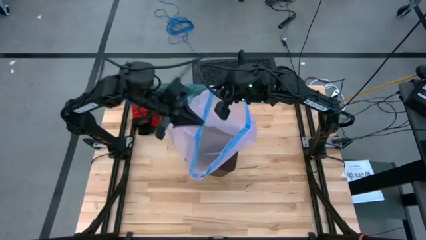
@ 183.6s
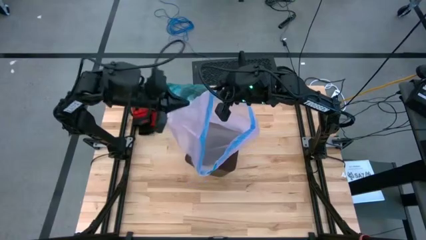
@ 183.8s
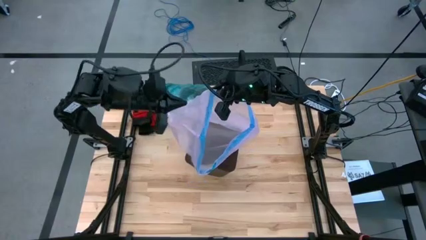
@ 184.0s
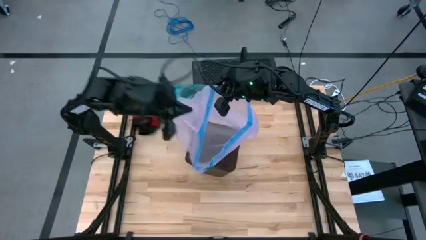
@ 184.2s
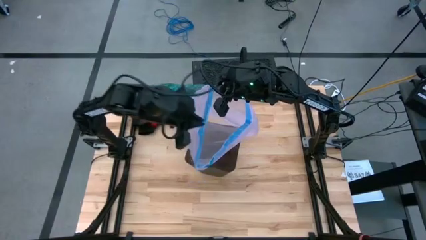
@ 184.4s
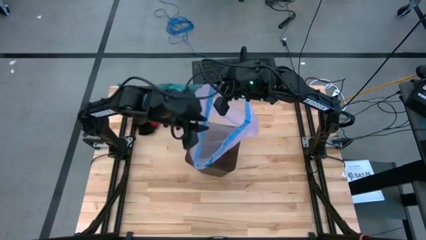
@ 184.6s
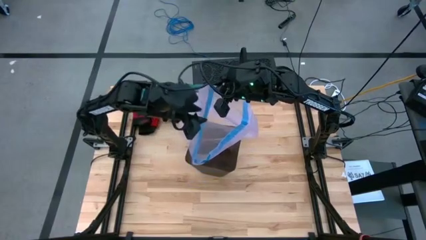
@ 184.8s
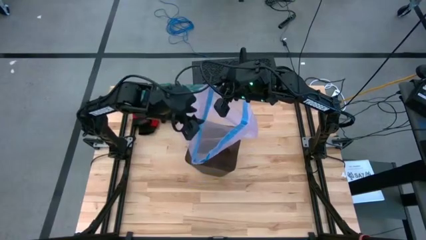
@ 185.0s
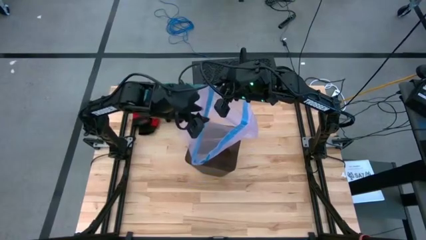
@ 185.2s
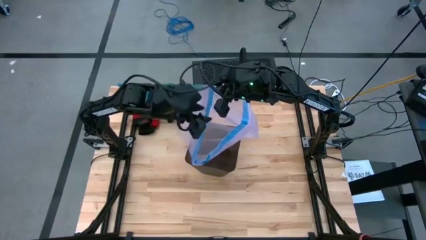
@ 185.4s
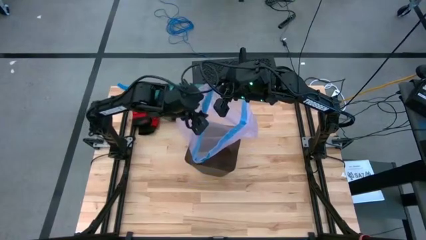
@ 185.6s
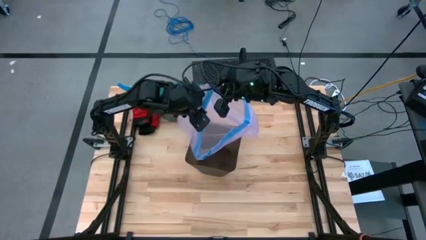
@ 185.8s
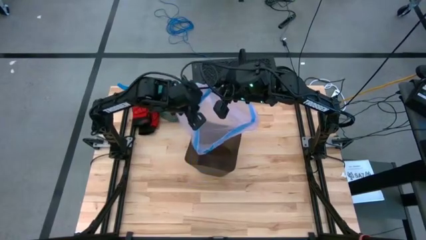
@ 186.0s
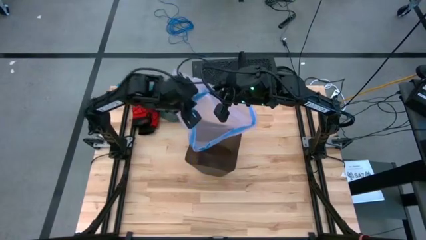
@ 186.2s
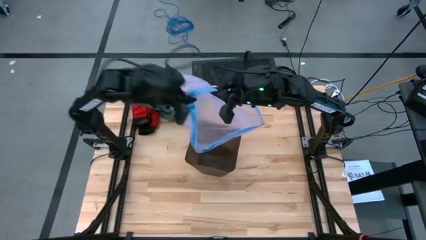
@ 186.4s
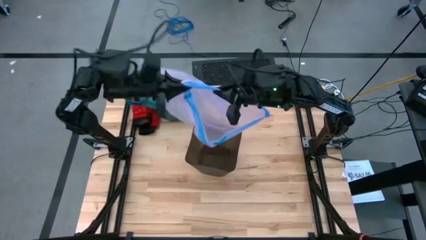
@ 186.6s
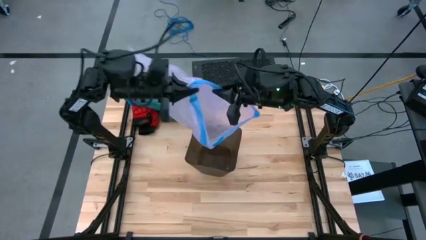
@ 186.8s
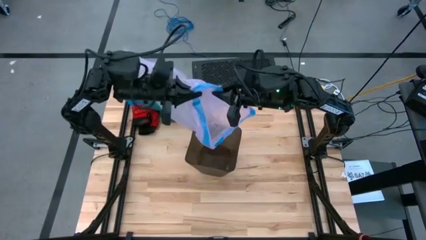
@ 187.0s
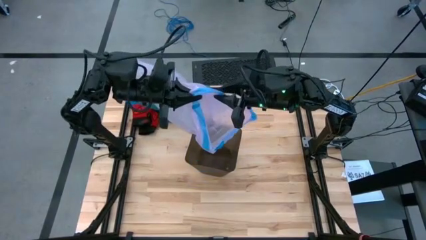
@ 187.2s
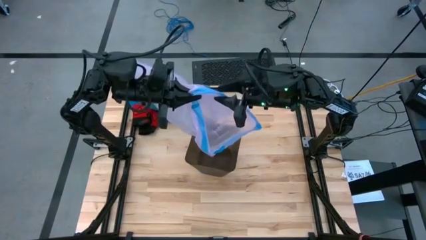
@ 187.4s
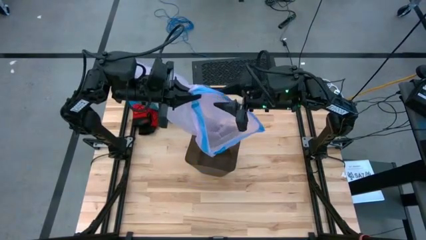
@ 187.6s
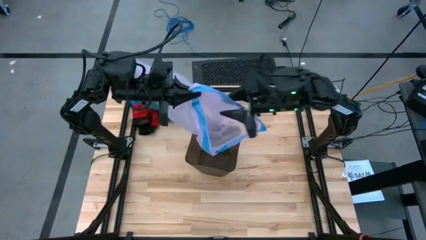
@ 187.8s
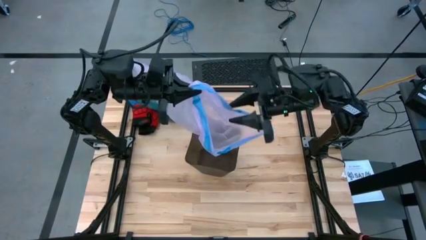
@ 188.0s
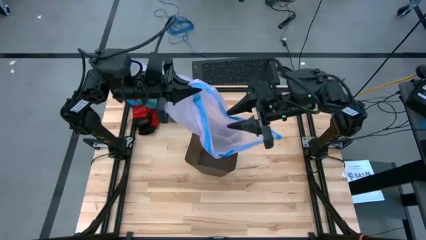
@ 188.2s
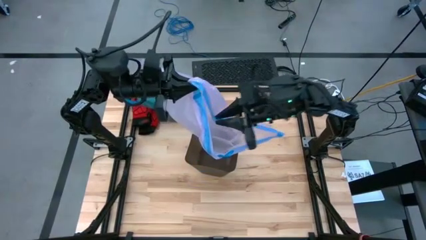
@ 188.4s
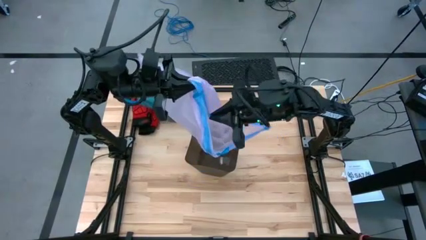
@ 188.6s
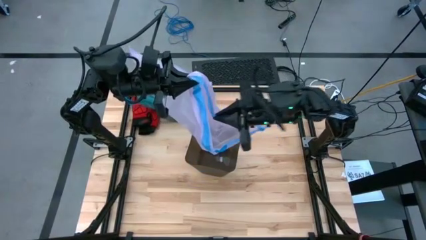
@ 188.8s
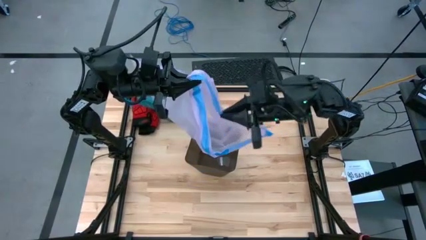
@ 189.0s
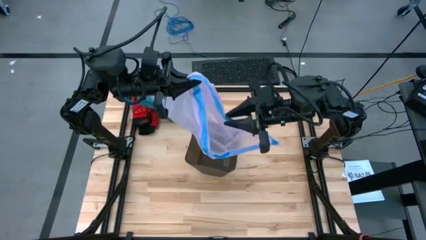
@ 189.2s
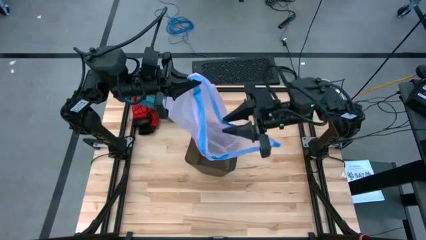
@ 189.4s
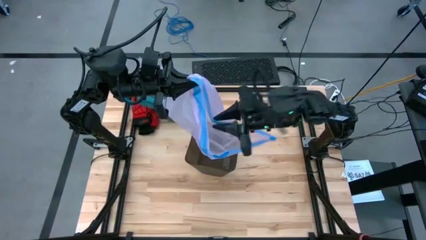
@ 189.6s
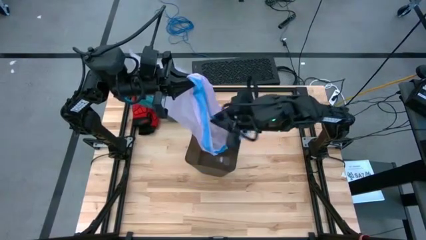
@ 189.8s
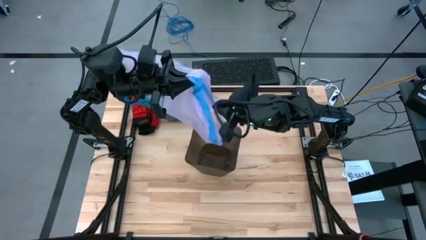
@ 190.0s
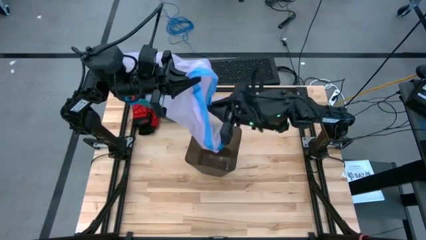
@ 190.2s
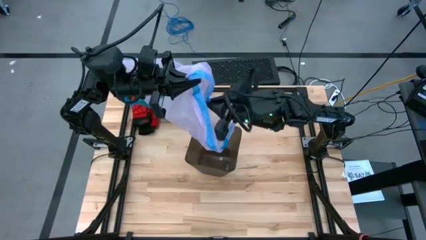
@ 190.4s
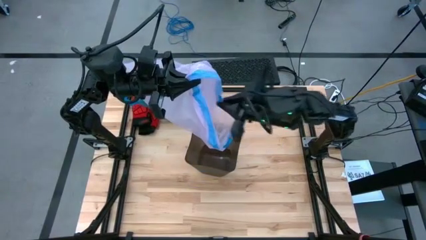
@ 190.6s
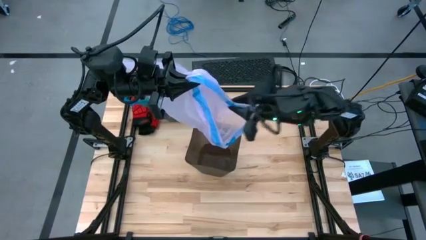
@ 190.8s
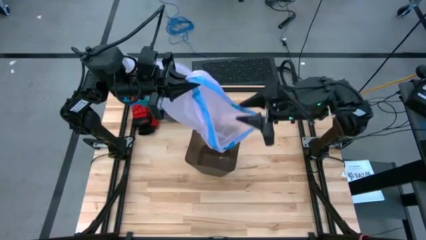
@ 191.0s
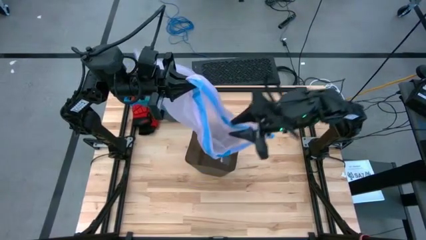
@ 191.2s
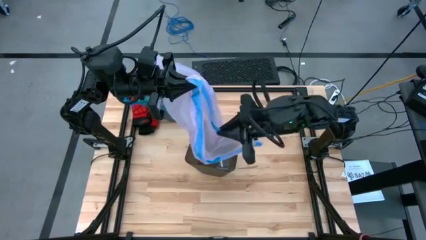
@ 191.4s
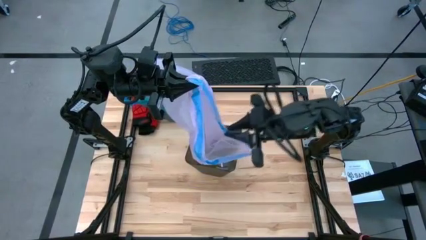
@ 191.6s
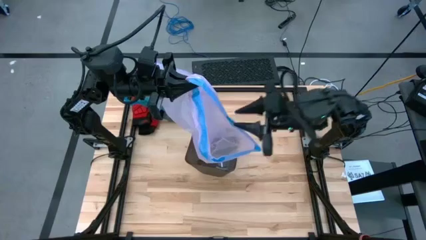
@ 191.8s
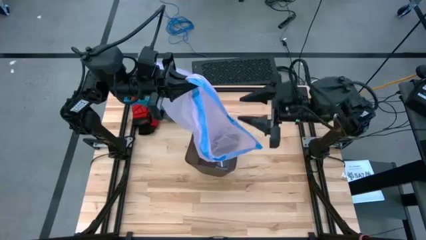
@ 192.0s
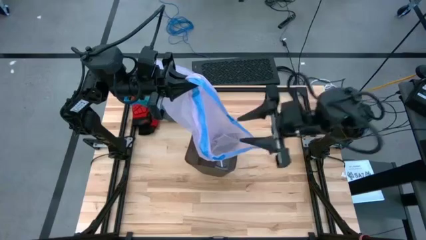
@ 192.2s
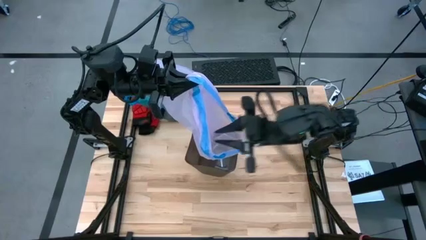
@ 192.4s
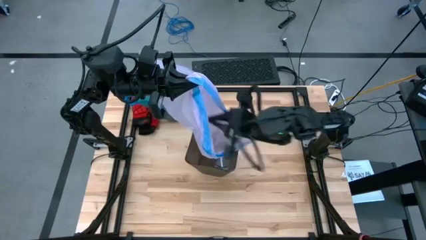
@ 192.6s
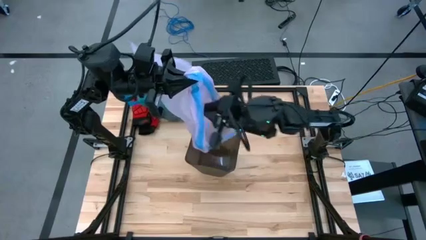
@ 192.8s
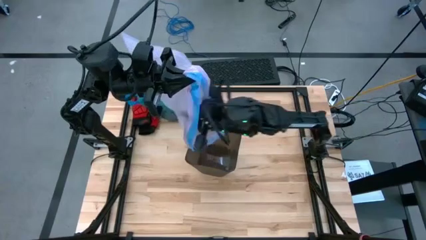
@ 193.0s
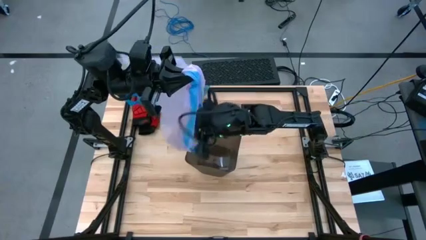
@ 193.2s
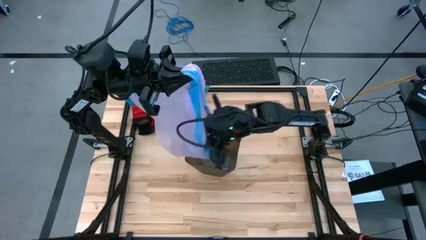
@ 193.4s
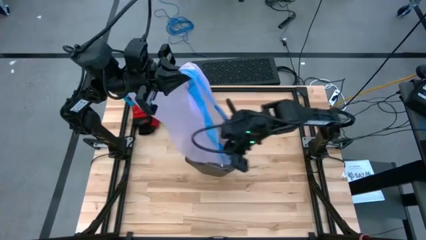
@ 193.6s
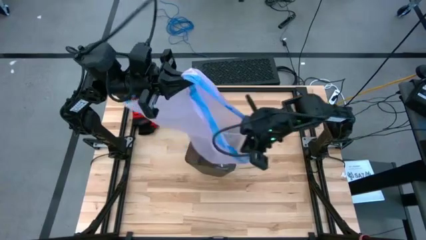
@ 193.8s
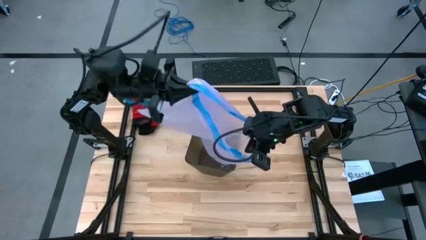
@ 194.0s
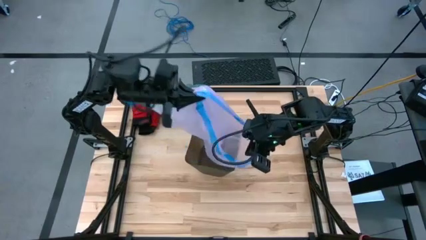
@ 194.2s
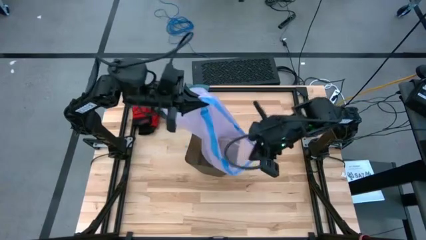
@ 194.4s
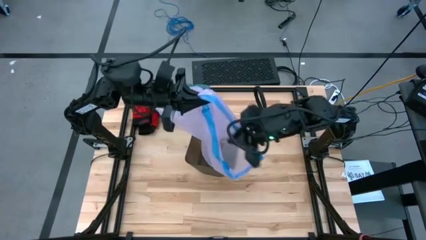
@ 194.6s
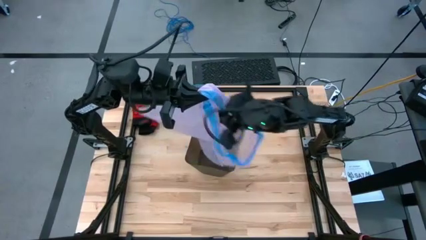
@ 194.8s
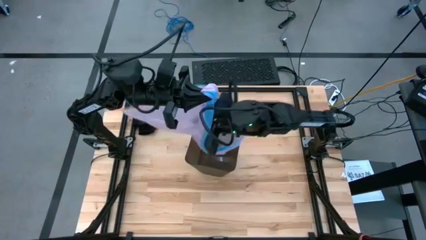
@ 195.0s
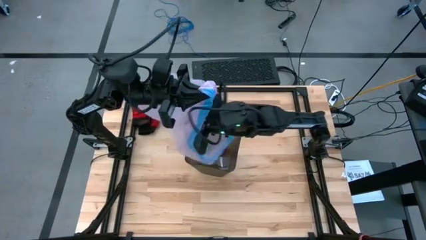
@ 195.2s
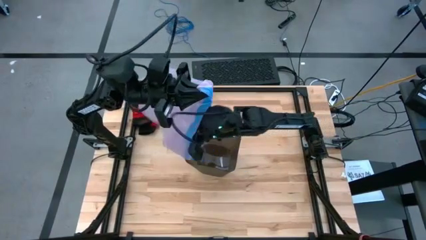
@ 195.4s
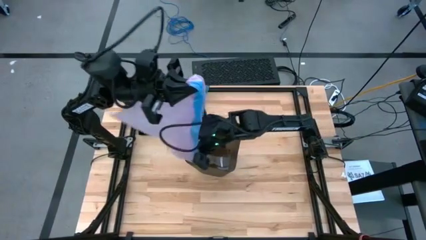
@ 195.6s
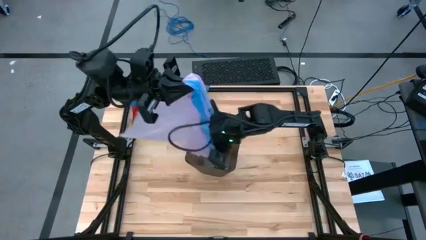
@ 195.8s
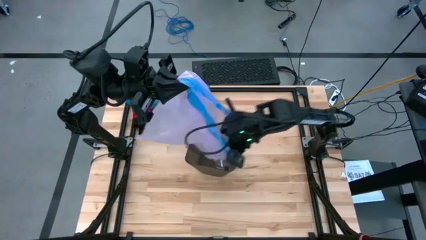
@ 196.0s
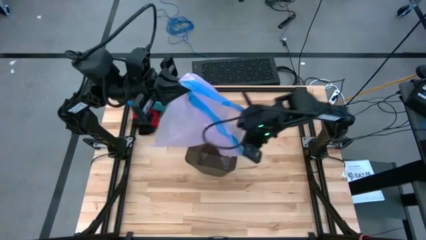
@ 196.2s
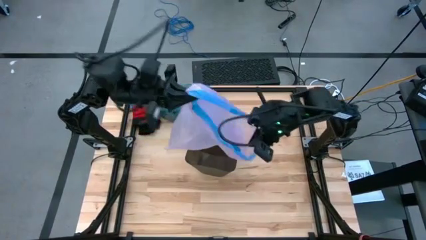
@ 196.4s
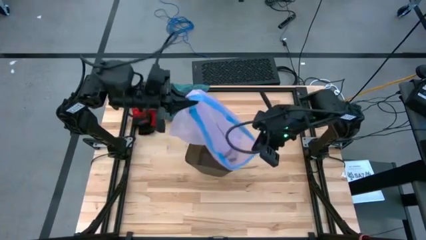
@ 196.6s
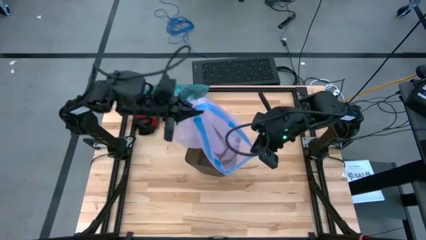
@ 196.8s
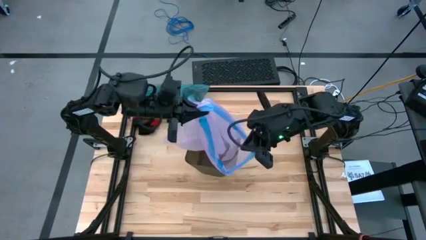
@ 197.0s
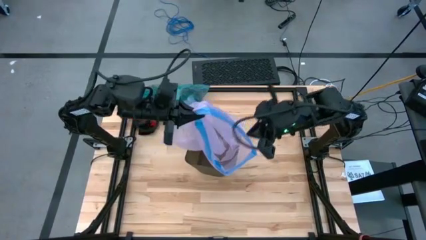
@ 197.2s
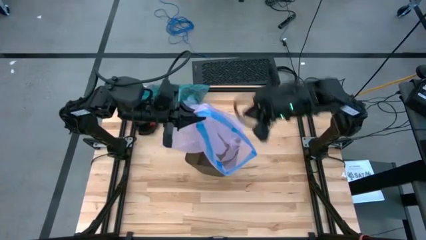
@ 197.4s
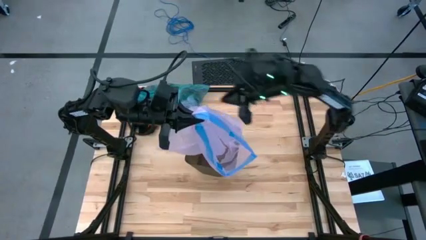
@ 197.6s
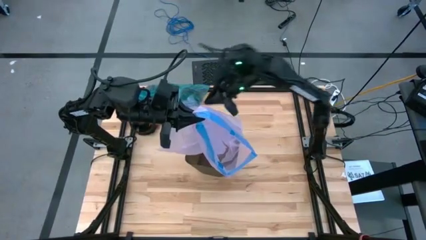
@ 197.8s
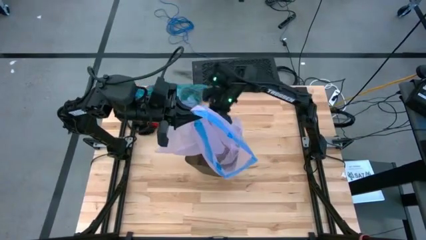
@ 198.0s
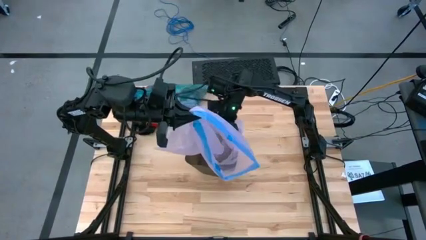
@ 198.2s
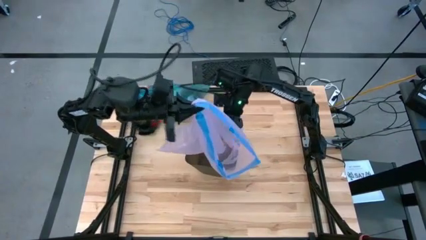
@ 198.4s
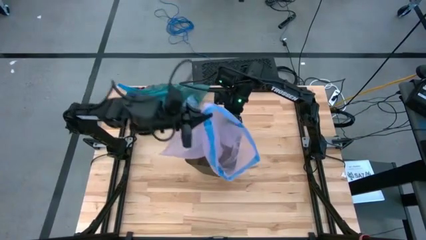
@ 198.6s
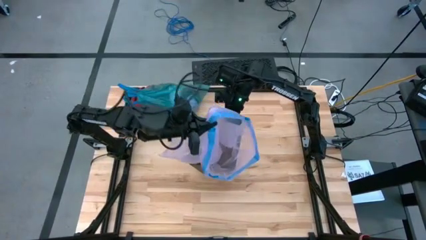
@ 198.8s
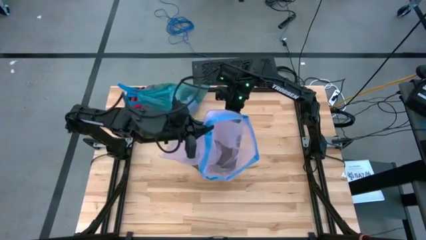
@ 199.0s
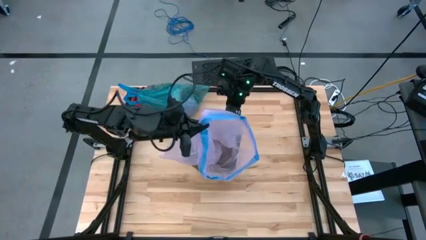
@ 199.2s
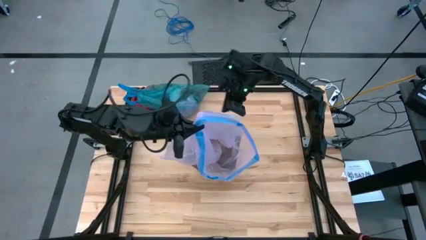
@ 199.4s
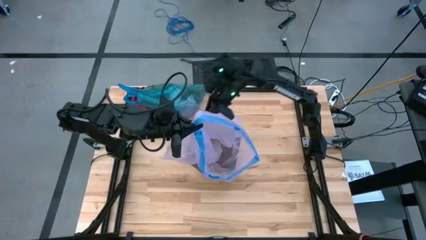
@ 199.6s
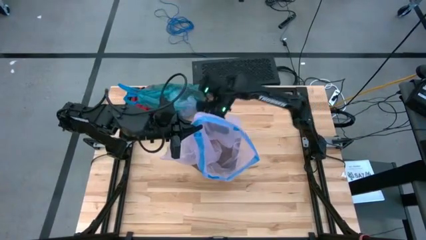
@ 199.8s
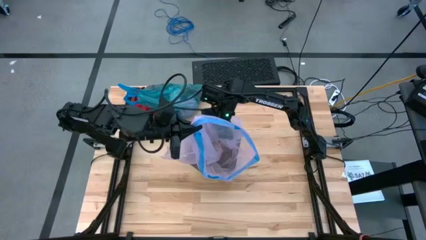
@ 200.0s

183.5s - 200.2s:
Task: place trash/remove bag and relplace
Insert the new pink trash bag into the black trash bin
